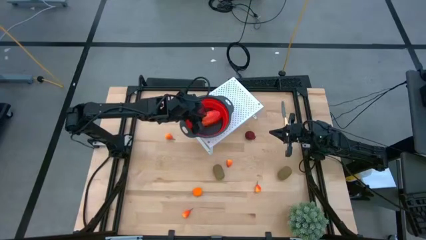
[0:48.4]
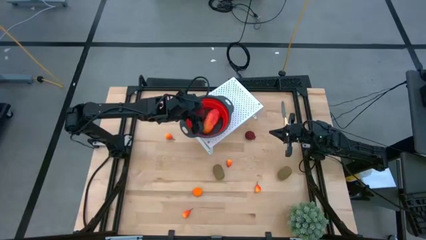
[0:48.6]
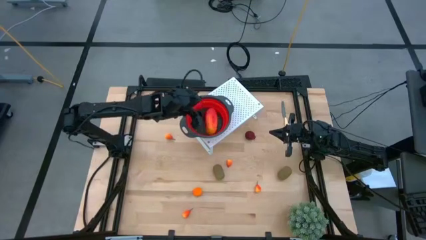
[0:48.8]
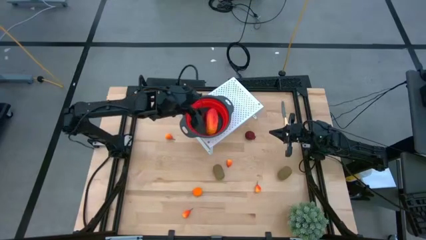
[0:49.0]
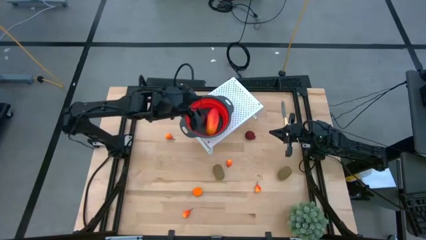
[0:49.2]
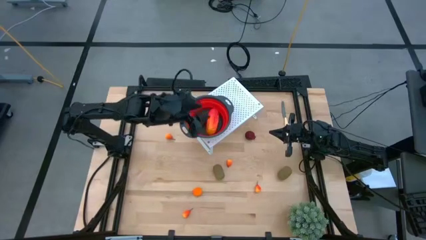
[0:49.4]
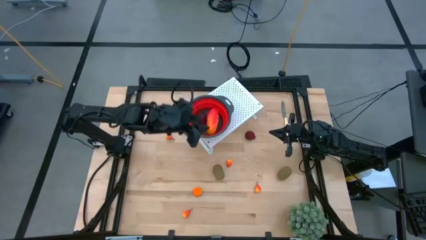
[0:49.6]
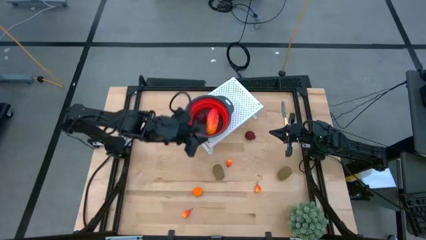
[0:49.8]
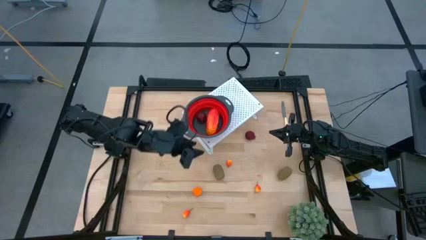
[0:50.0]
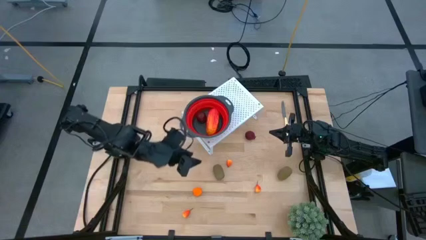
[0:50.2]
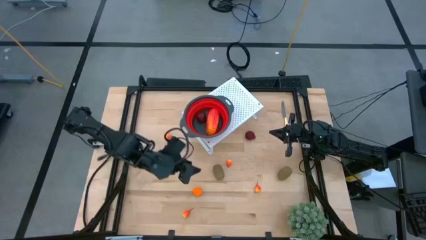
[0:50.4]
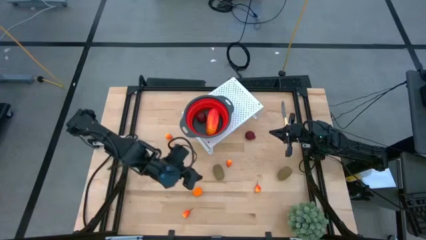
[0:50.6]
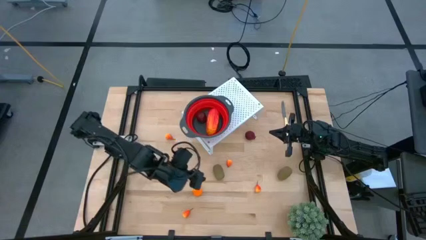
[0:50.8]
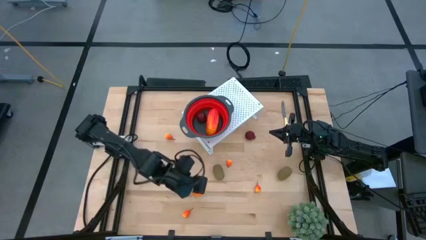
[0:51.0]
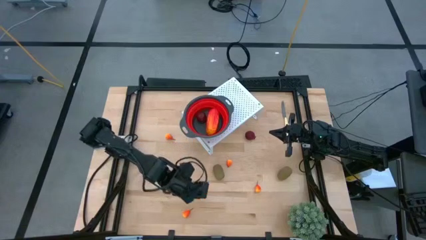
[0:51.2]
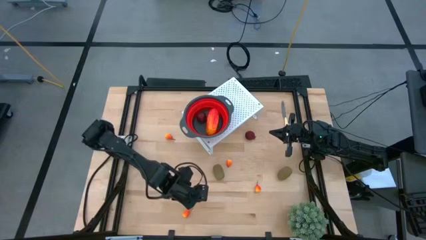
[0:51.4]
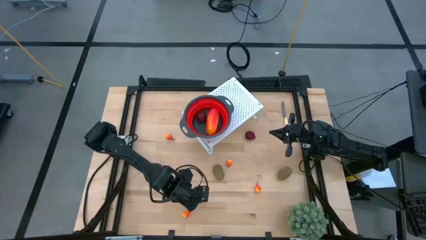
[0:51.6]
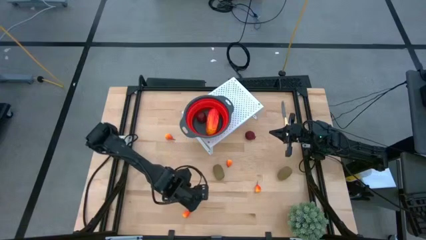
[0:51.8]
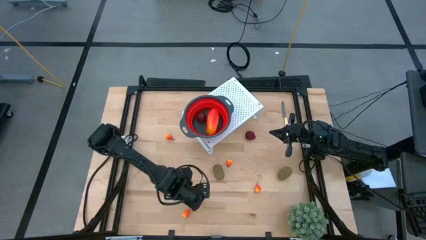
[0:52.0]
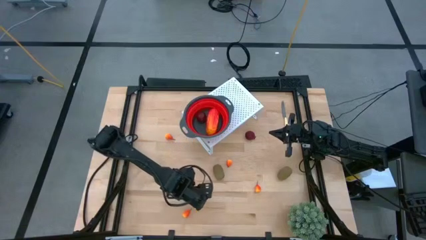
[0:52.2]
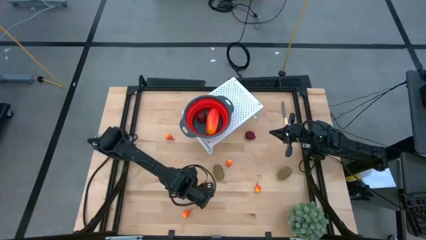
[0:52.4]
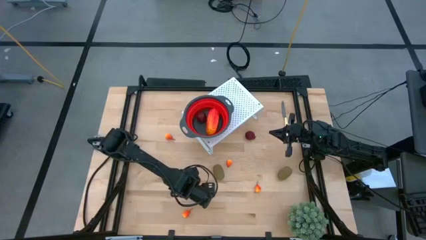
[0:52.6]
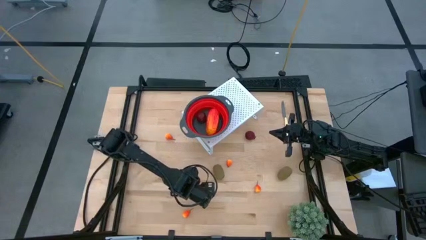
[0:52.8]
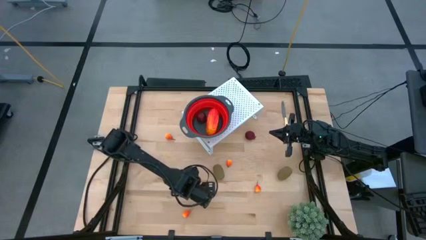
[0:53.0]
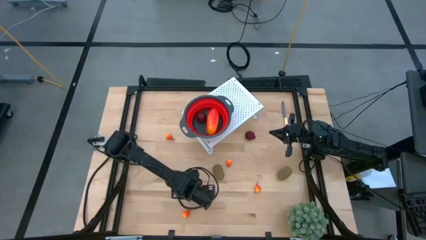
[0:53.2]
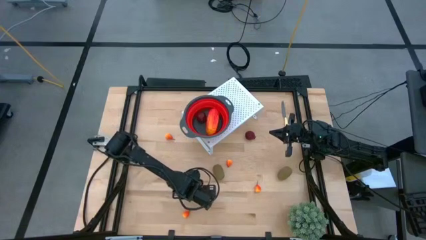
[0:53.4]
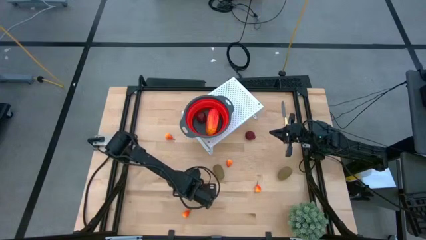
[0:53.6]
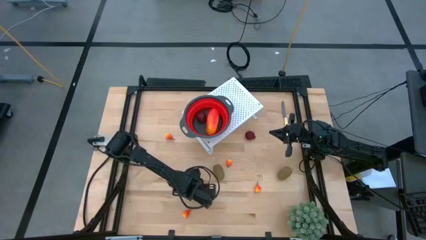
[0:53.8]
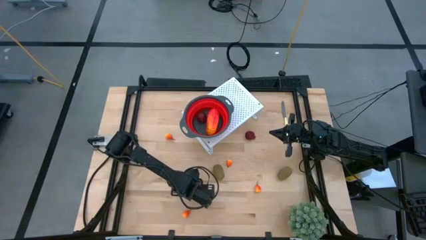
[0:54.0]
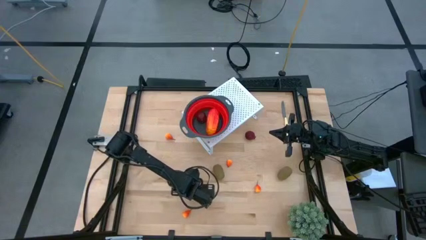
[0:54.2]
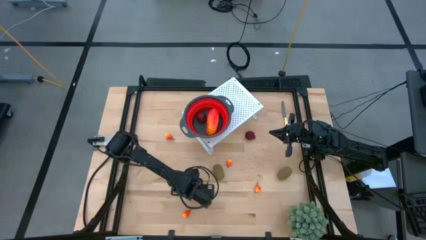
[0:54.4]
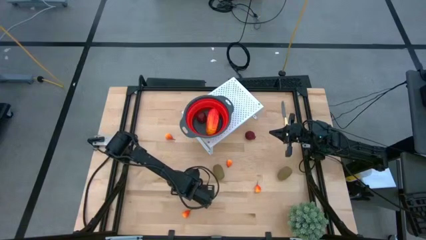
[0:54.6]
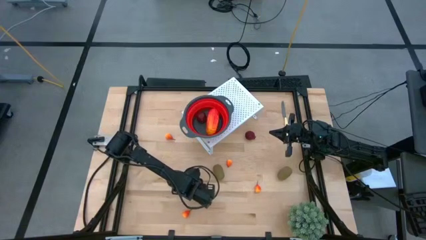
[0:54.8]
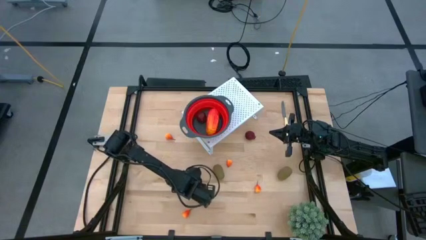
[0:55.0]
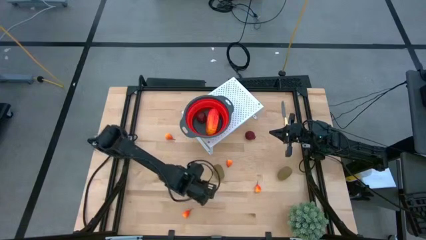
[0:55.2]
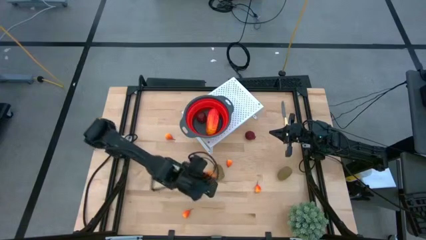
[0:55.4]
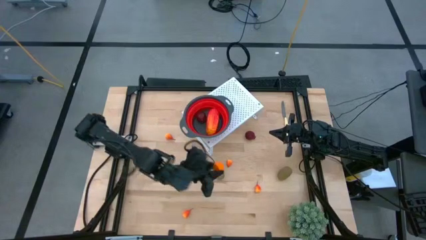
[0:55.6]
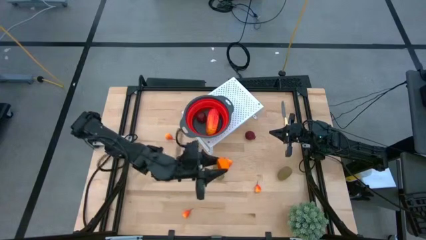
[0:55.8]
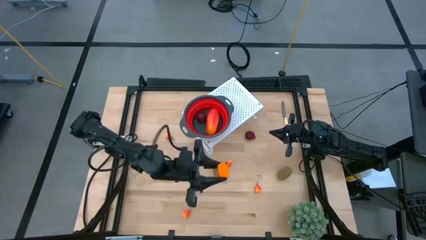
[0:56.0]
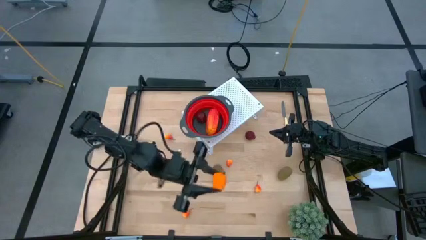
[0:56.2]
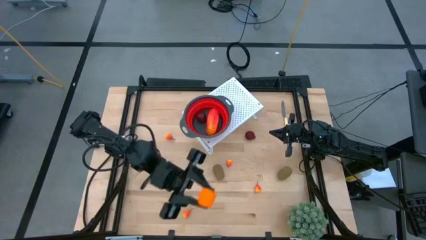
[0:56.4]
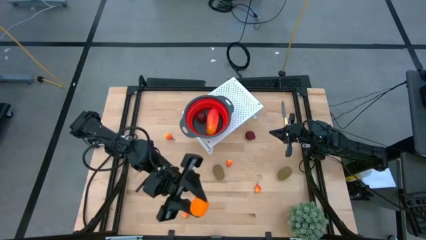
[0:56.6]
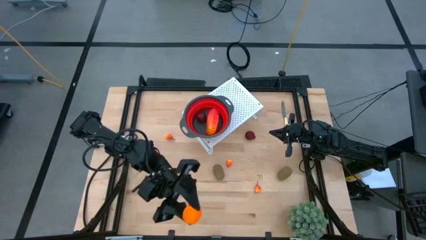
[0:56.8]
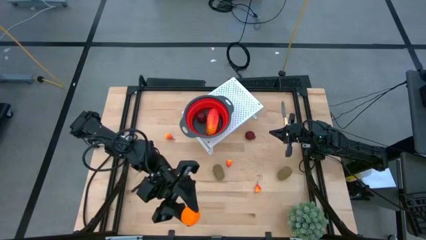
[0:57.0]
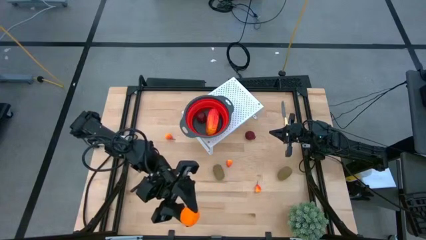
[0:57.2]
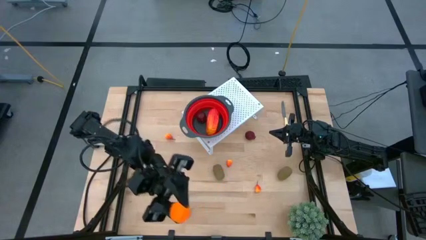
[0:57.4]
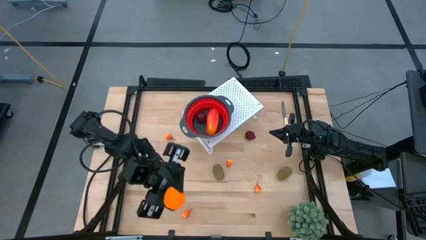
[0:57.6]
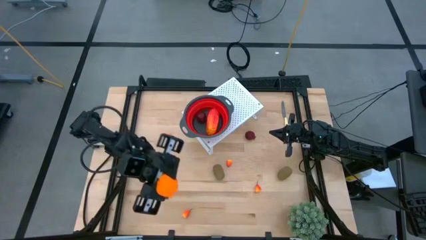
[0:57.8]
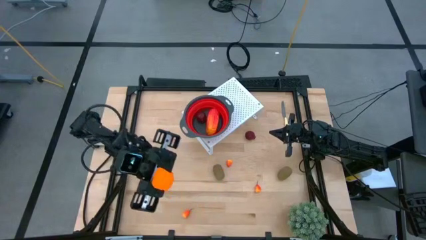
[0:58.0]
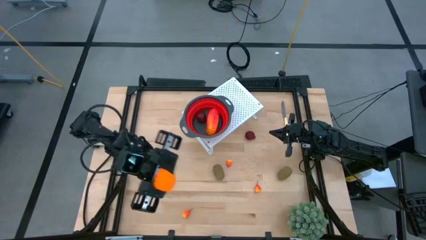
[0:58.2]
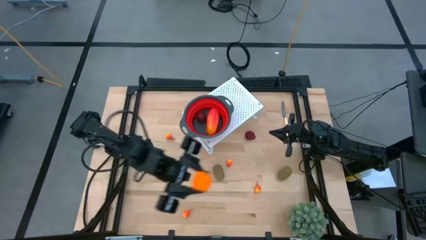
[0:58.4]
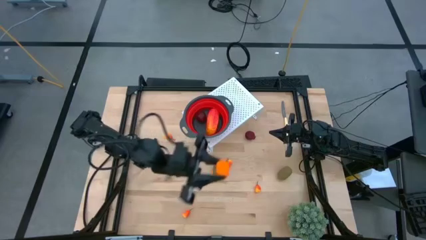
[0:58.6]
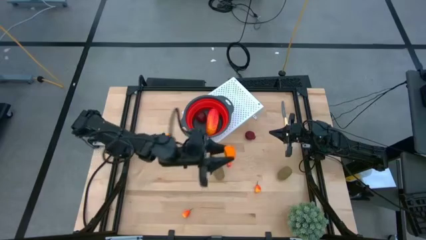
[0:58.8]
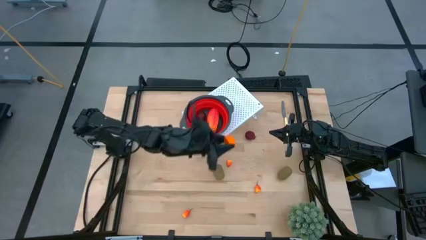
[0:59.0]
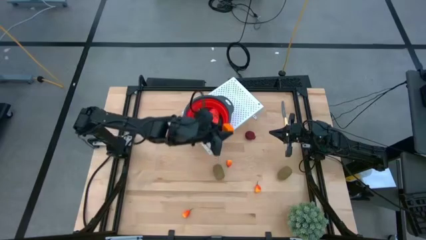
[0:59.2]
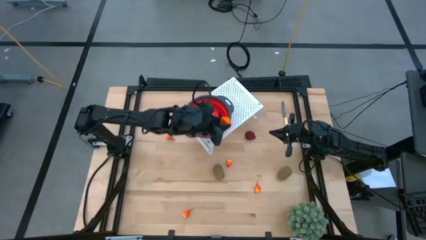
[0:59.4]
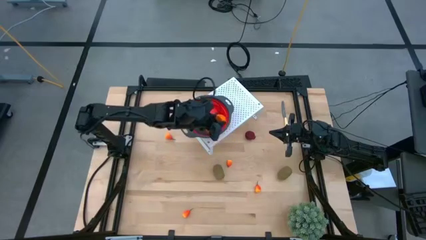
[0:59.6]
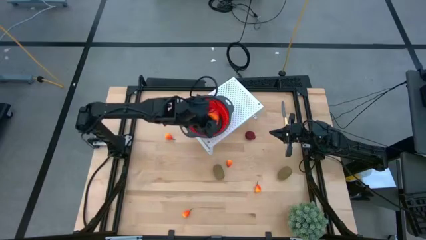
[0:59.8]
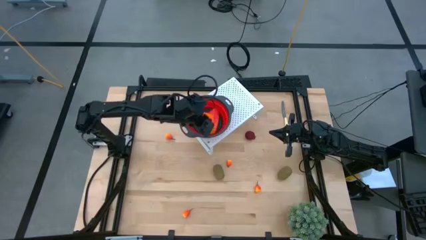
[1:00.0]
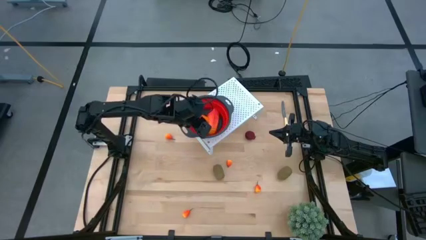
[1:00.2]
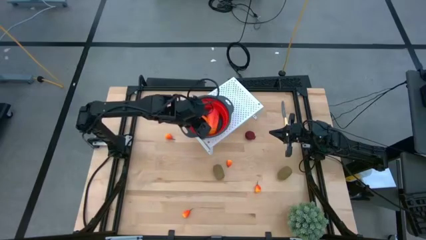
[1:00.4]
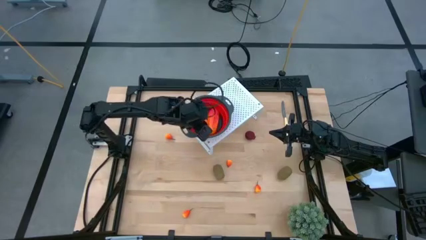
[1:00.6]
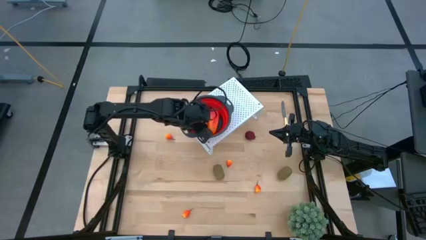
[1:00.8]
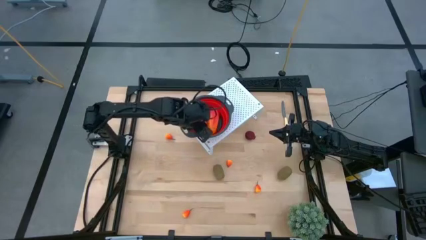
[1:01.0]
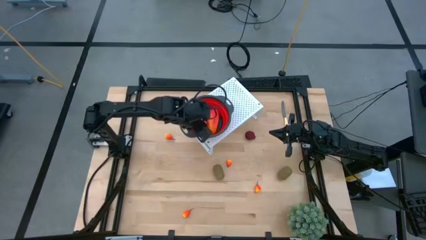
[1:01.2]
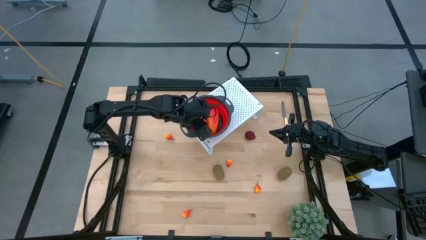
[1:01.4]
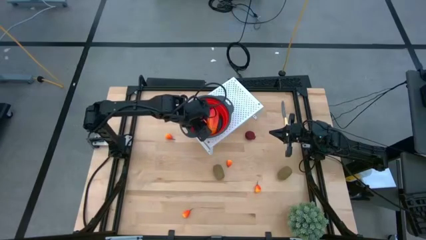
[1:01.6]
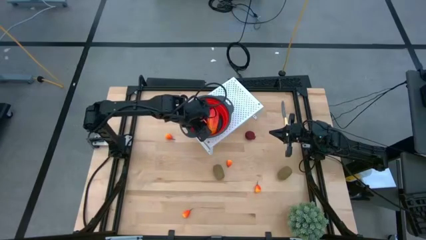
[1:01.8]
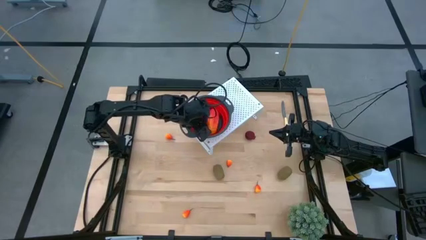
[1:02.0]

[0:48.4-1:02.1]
Task: Pick & Place Fruit
Put the orange into the red strainer bowl on the shelf
